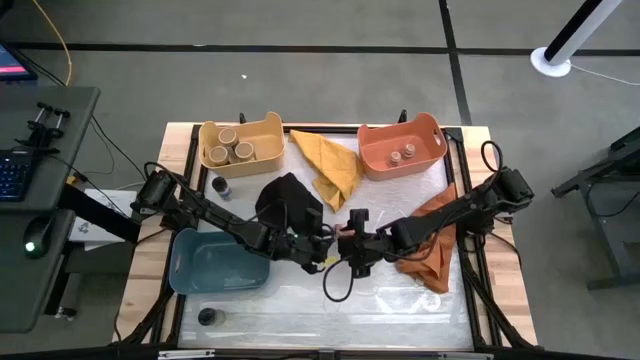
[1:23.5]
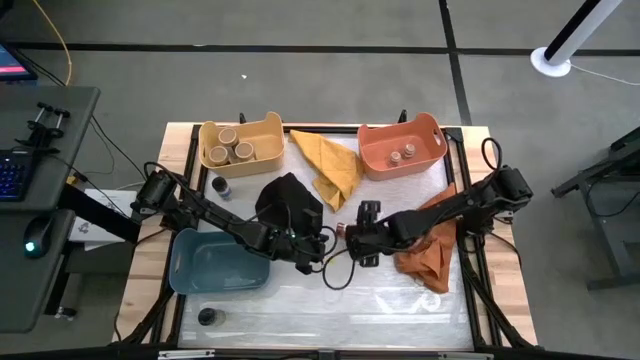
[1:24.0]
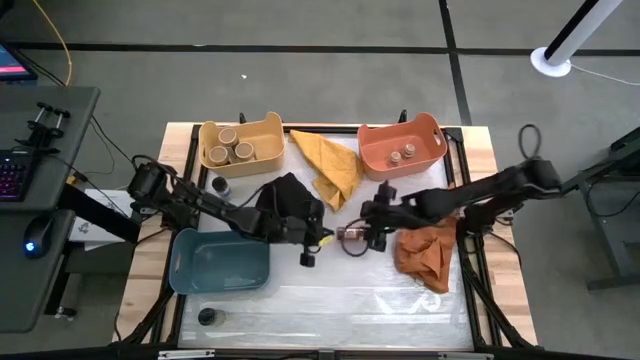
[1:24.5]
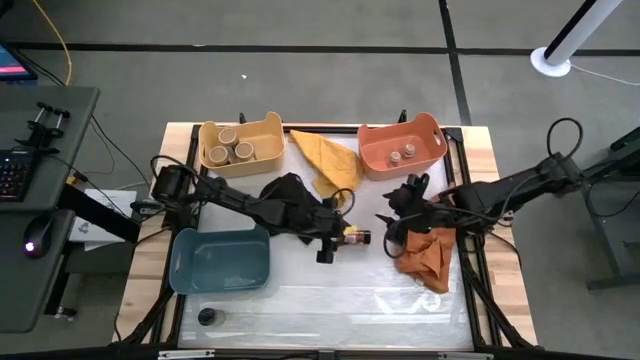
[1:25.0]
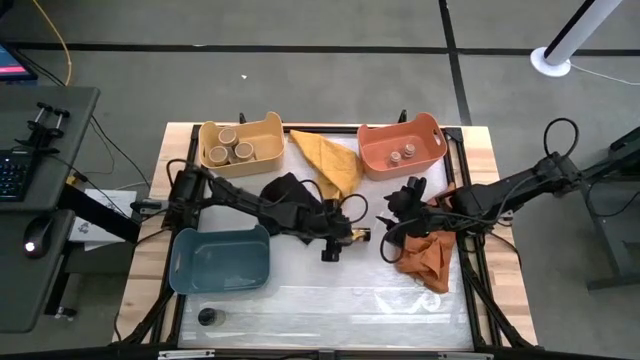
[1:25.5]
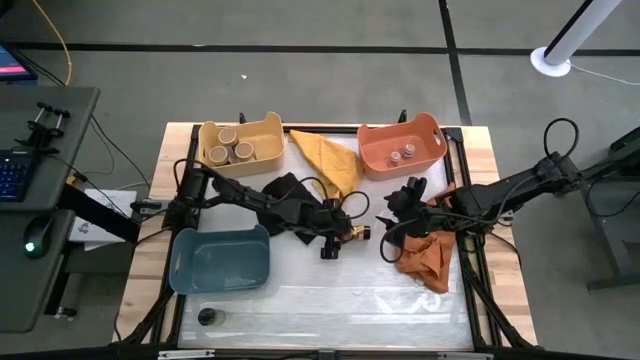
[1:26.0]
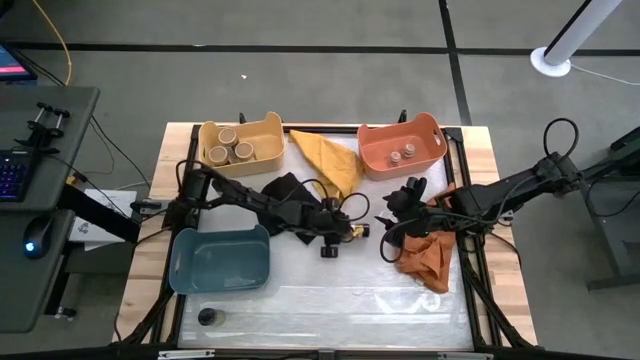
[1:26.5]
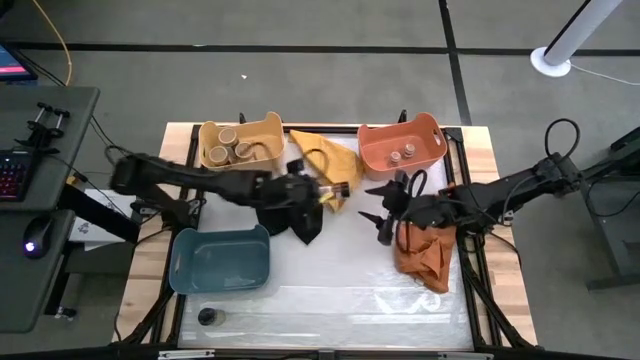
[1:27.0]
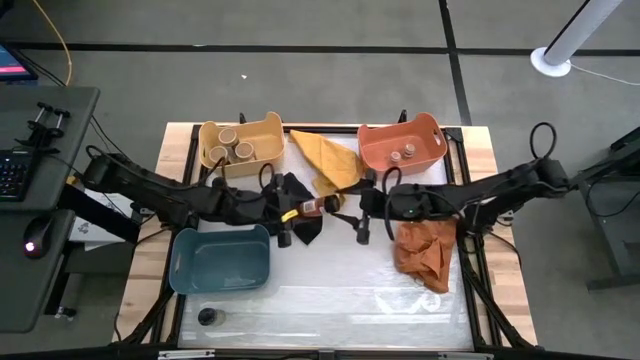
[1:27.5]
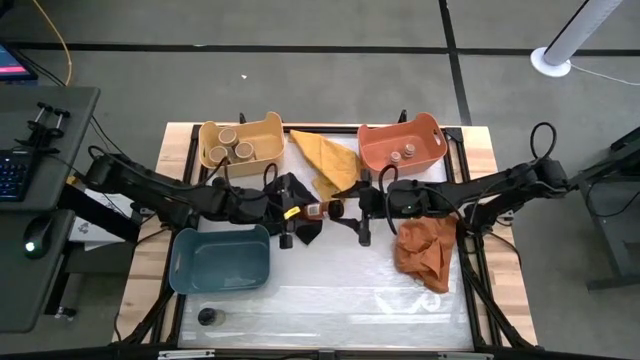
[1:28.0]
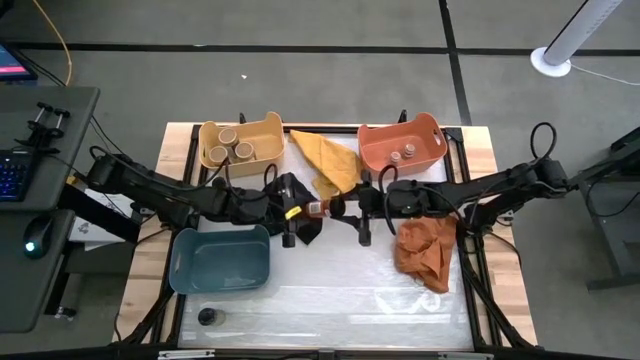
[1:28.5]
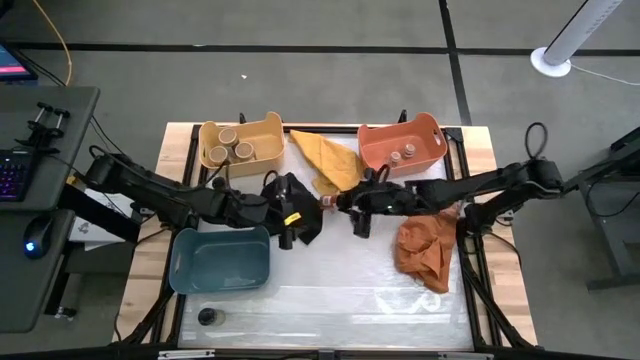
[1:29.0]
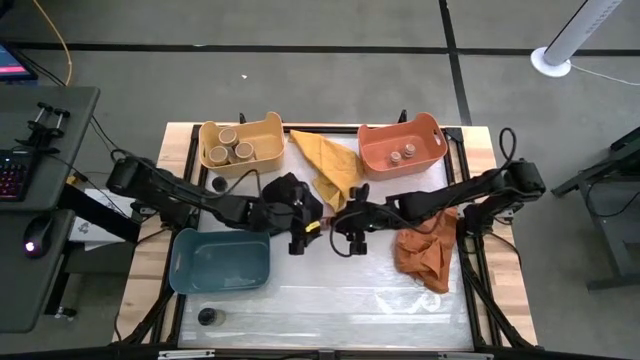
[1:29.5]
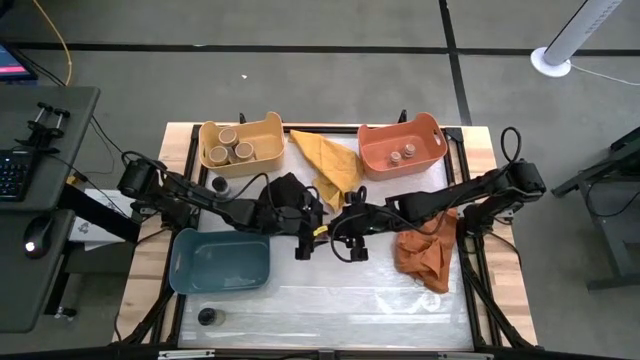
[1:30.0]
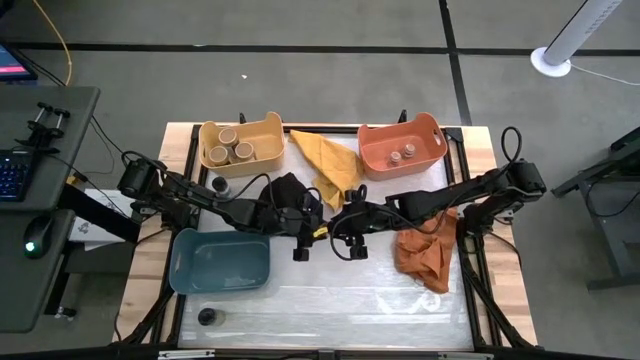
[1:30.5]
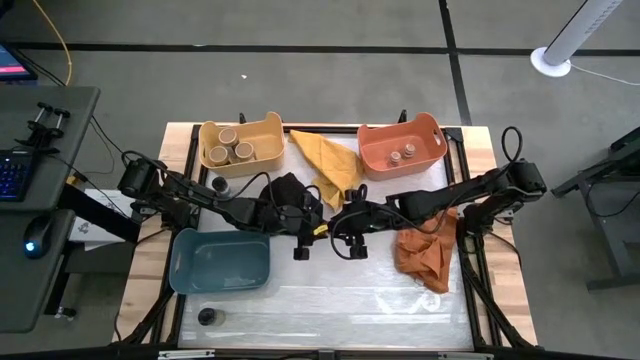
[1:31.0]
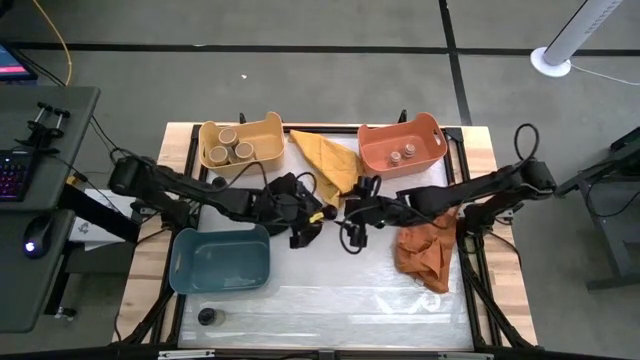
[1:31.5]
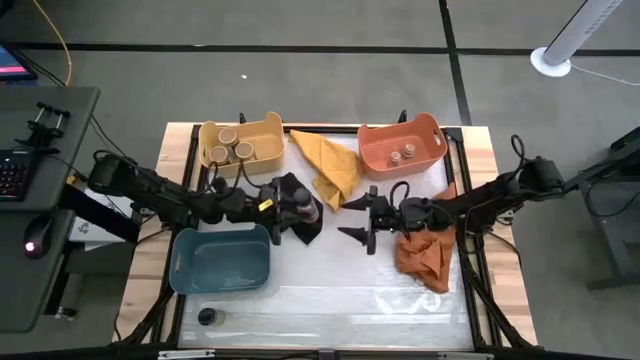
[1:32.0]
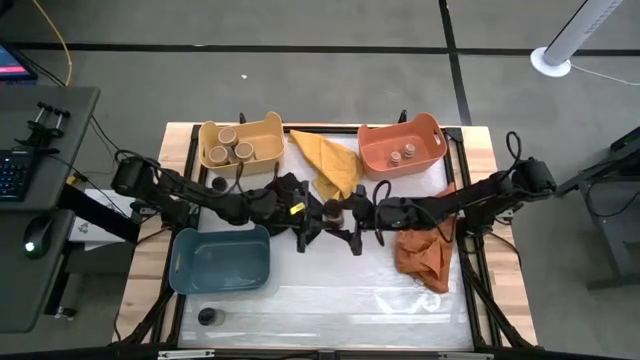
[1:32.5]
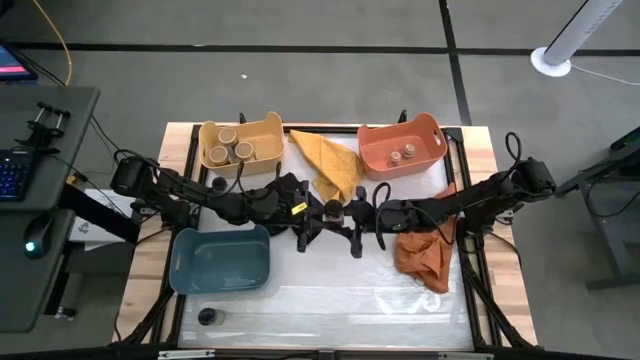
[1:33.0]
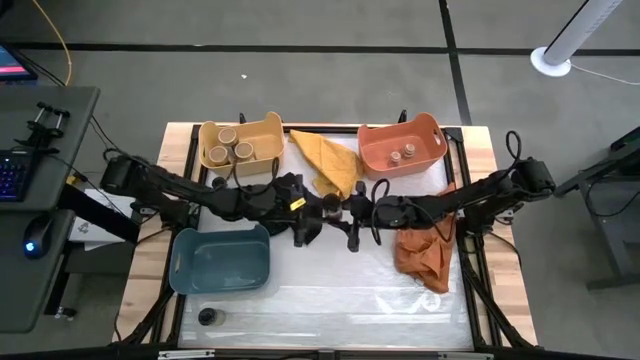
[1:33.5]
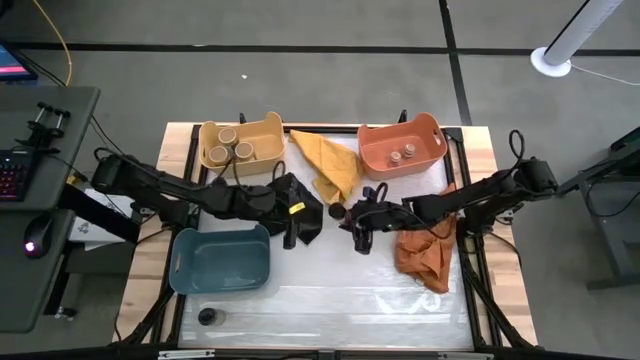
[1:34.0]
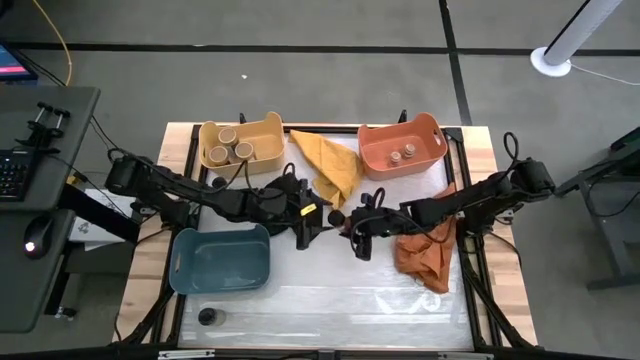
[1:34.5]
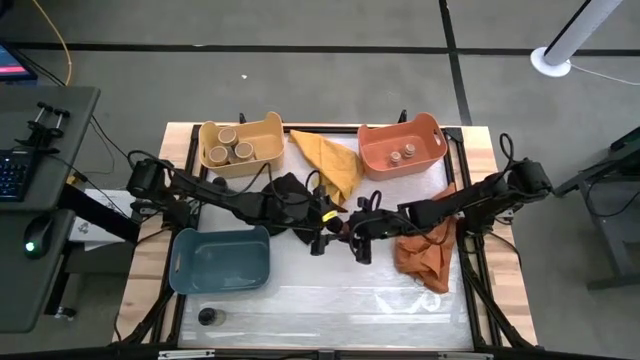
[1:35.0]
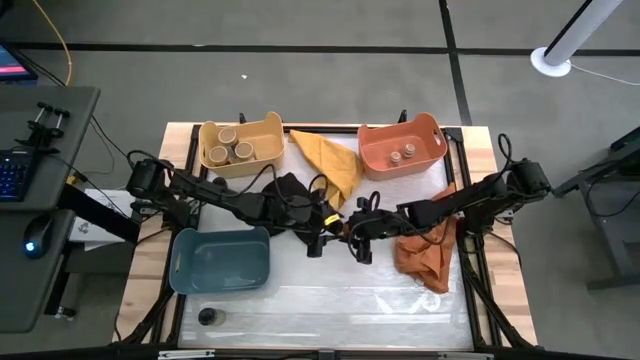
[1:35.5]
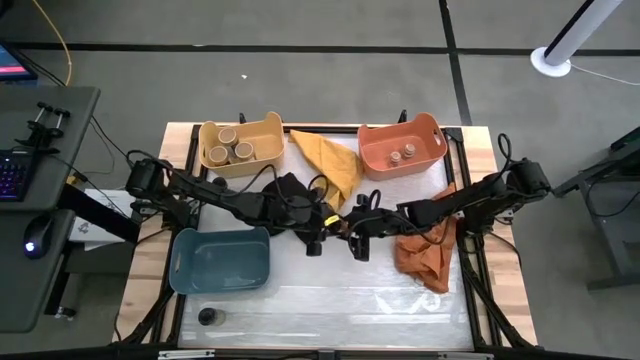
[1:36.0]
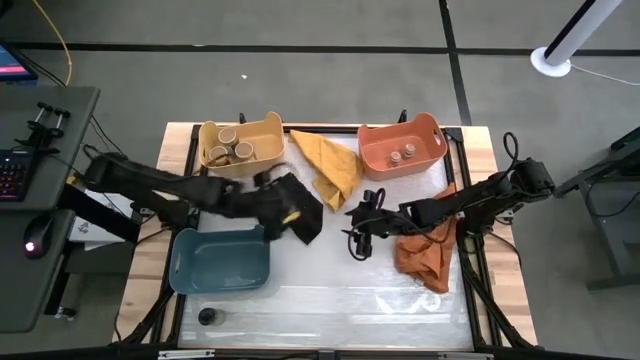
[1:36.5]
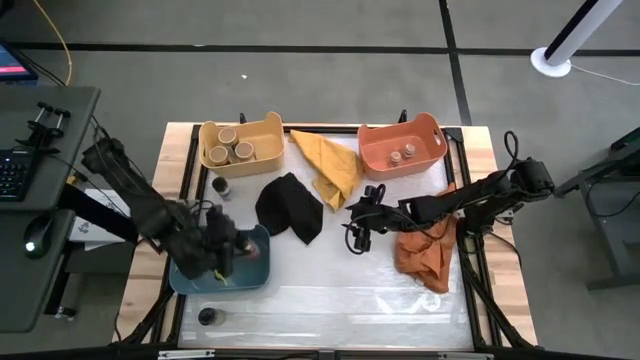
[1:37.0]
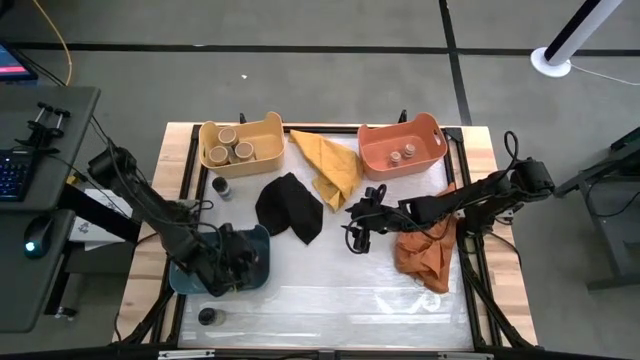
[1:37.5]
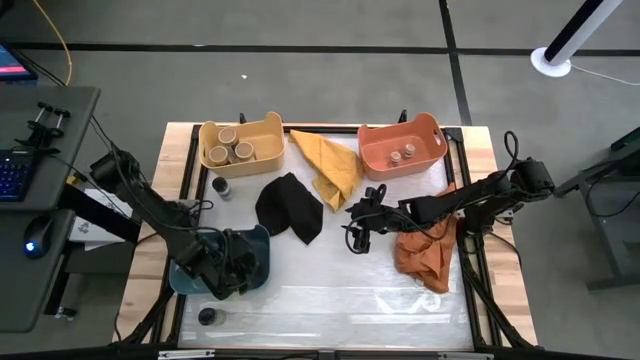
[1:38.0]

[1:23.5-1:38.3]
Task: Sort spices by type
Put the bottom right black spice bottle into the blue bin

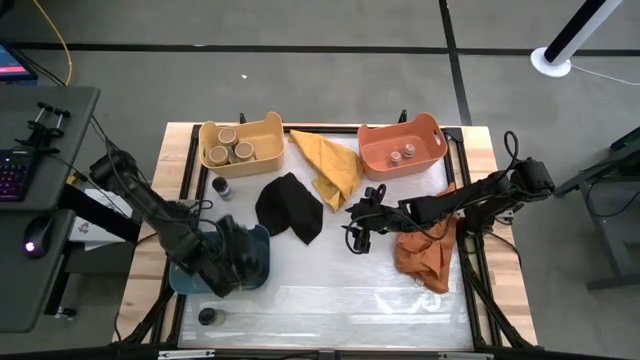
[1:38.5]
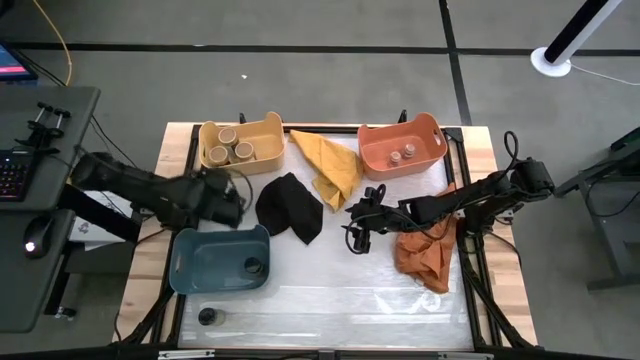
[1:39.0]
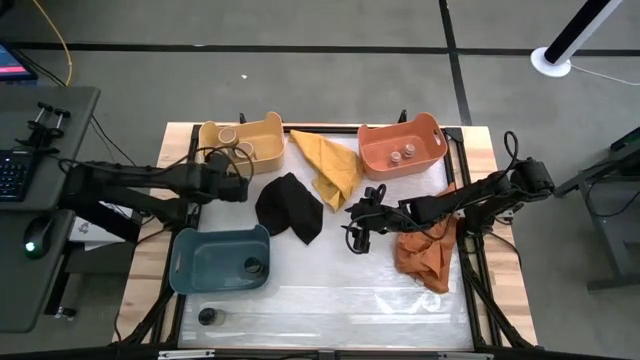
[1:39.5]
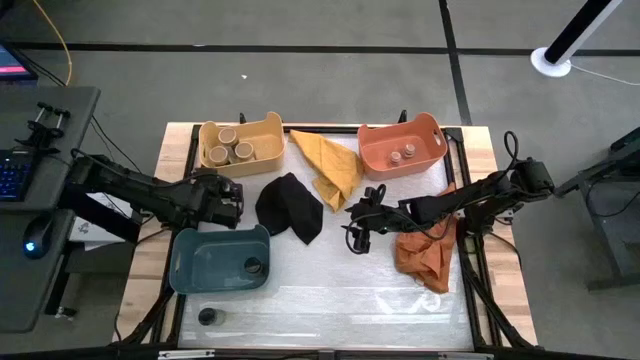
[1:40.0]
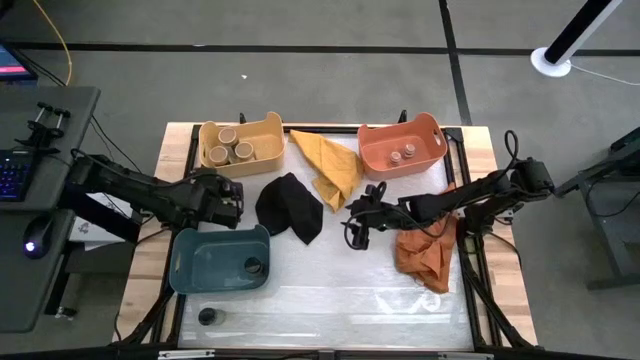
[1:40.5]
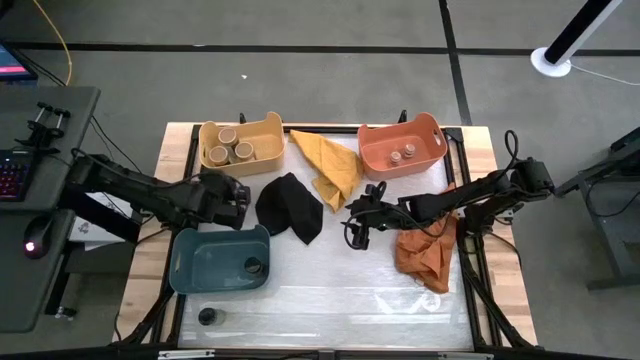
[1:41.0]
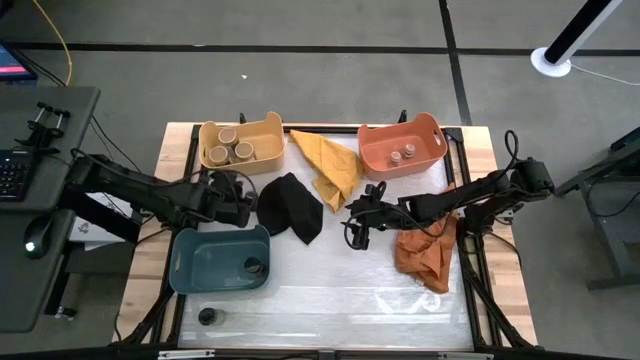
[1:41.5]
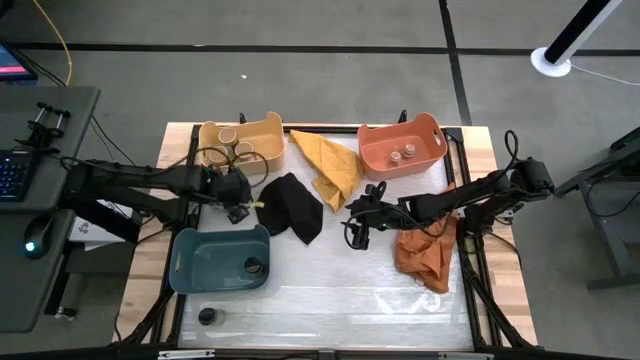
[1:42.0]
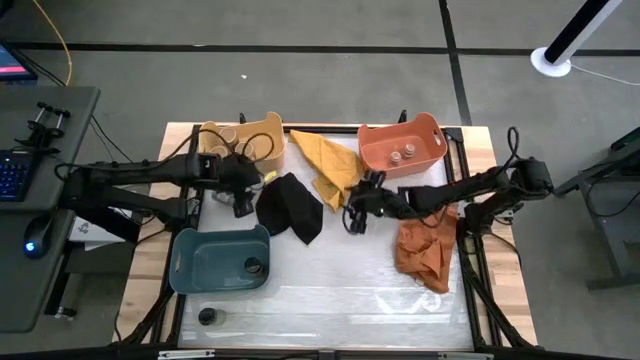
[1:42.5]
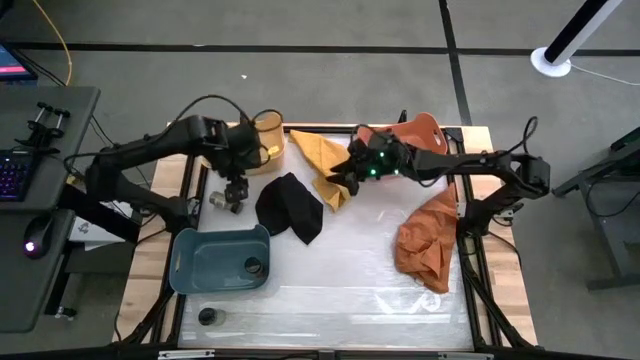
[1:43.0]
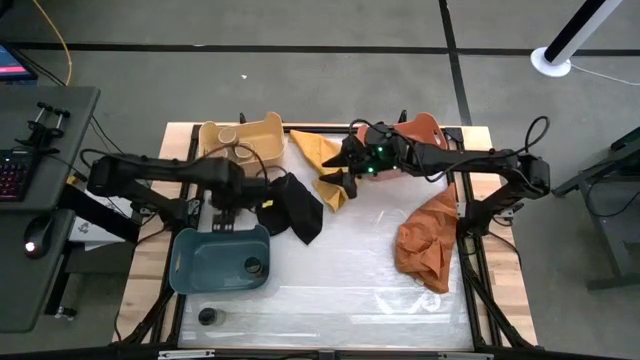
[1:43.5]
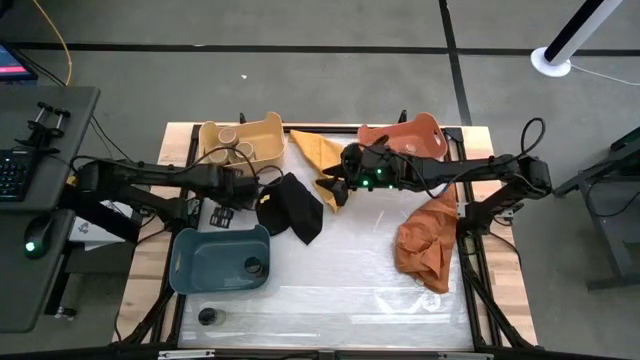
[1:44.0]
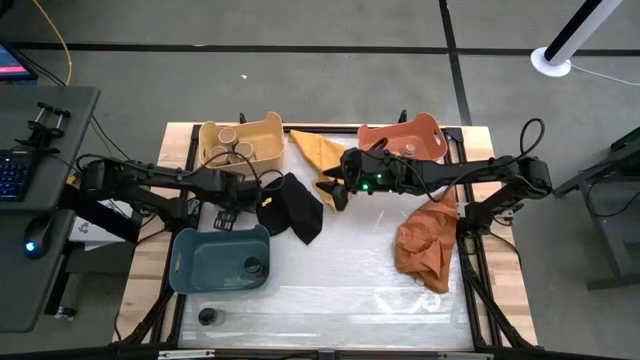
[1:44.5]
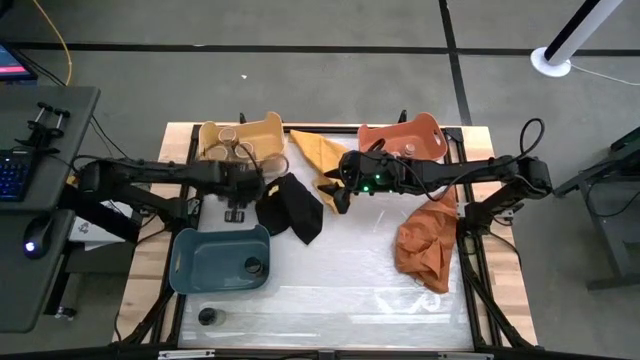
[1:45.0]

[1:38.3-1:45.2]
Put the top black spice bottle into the blue bin
